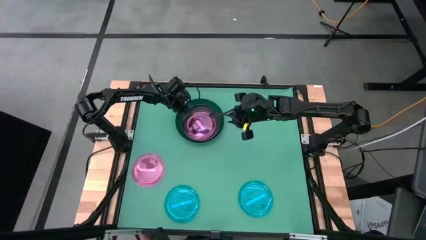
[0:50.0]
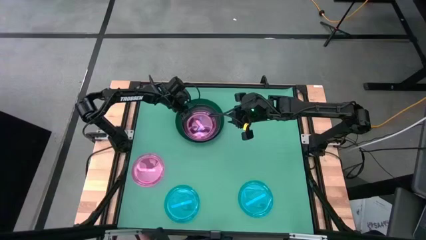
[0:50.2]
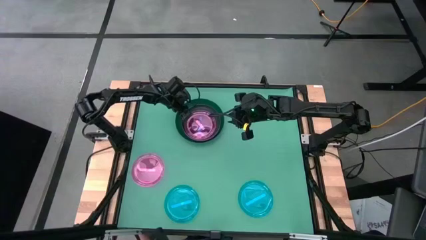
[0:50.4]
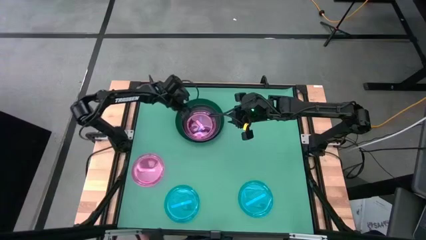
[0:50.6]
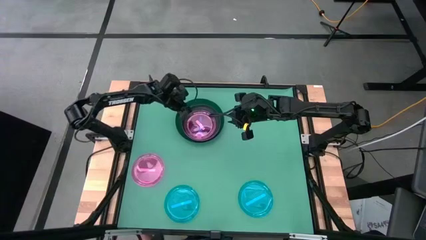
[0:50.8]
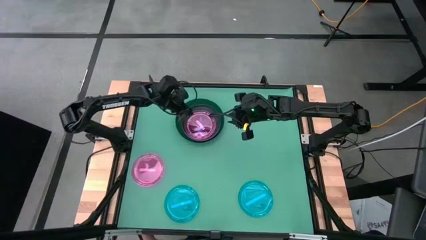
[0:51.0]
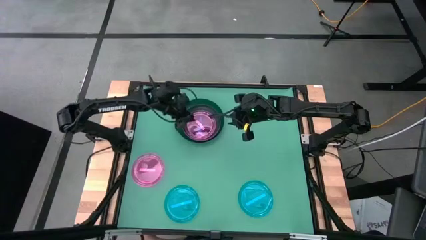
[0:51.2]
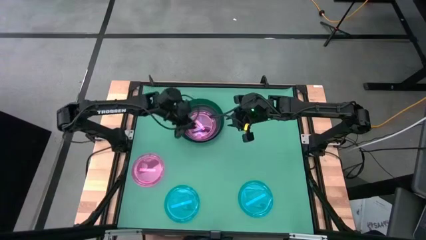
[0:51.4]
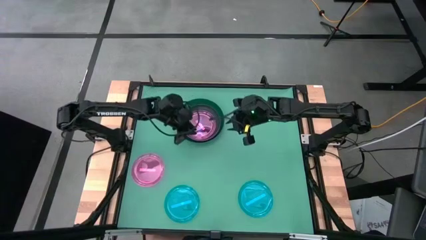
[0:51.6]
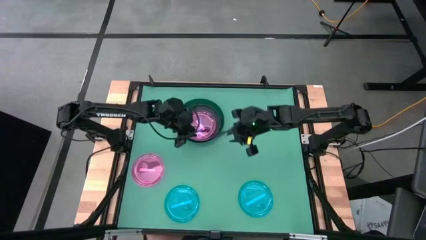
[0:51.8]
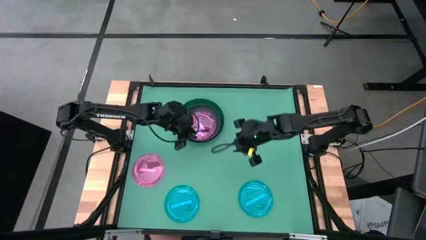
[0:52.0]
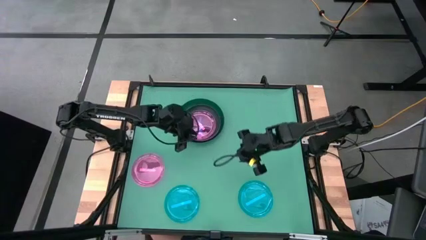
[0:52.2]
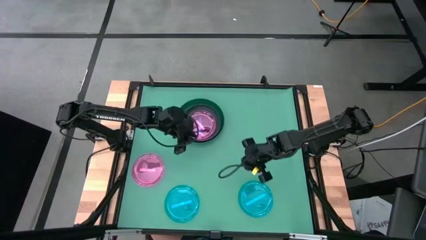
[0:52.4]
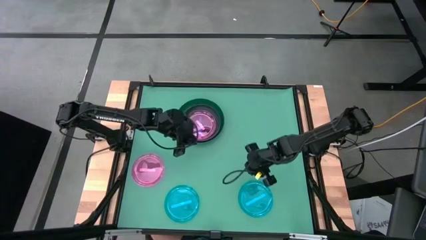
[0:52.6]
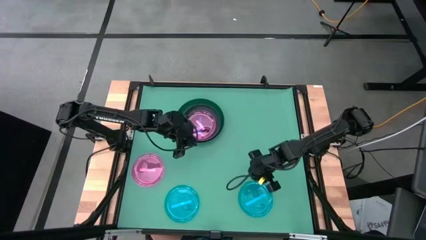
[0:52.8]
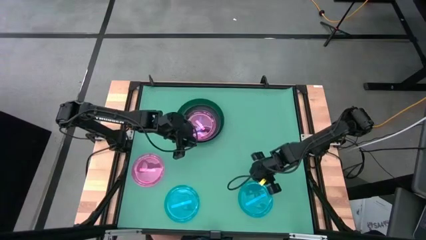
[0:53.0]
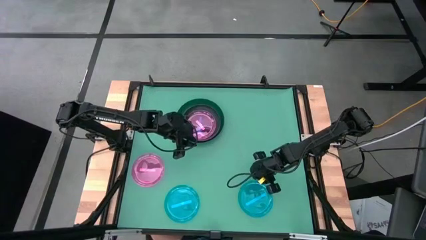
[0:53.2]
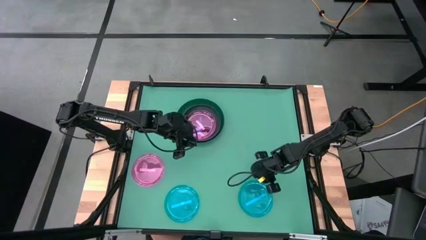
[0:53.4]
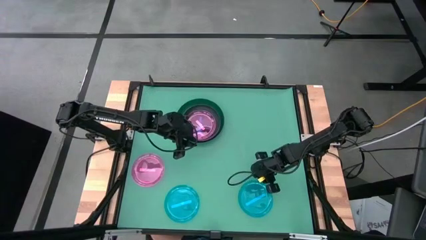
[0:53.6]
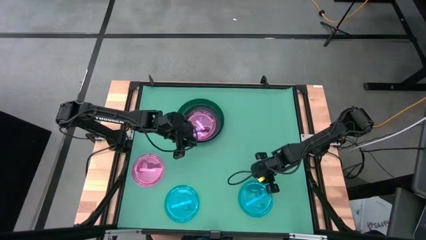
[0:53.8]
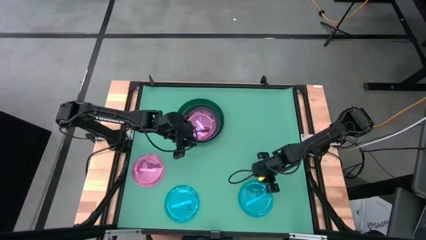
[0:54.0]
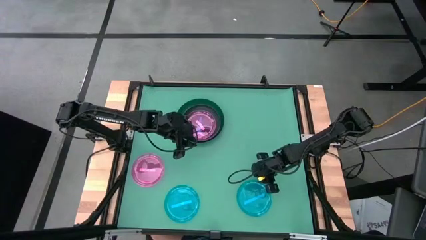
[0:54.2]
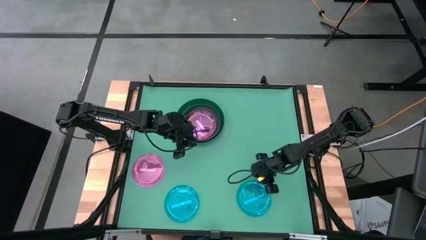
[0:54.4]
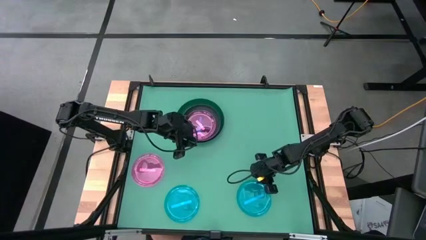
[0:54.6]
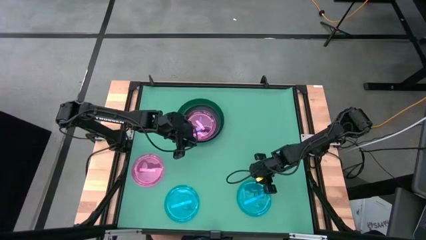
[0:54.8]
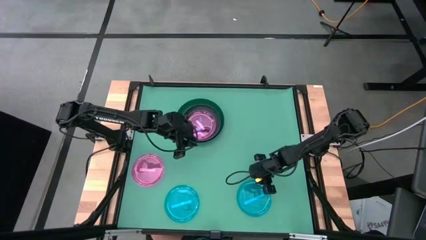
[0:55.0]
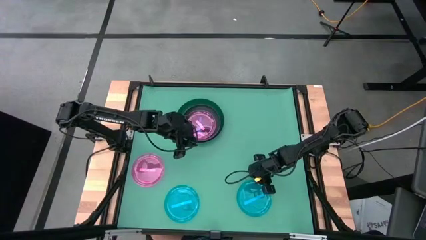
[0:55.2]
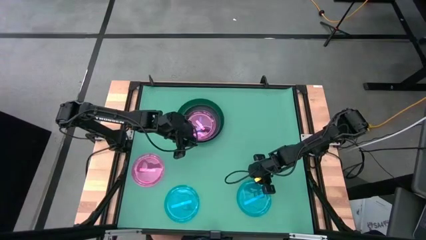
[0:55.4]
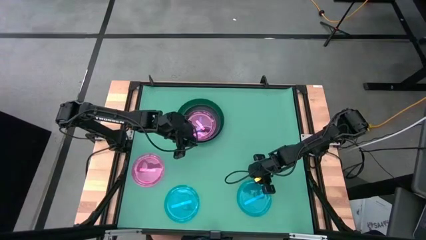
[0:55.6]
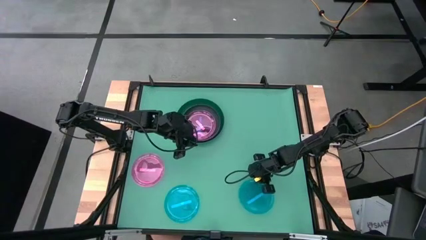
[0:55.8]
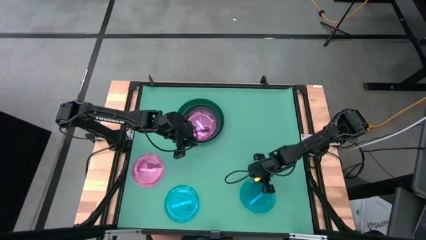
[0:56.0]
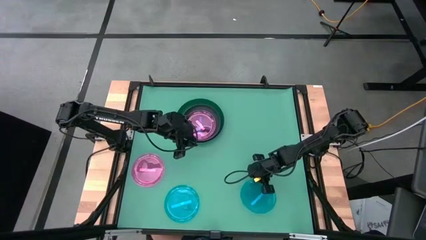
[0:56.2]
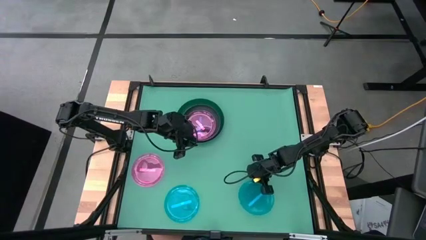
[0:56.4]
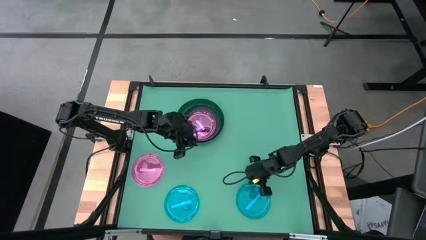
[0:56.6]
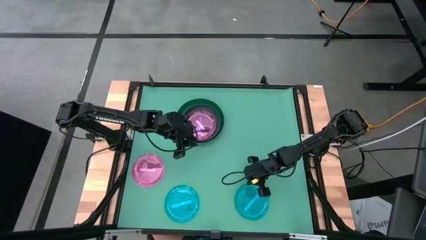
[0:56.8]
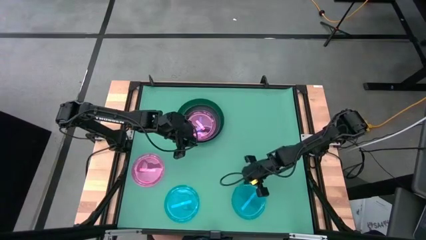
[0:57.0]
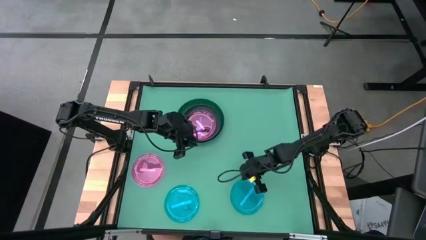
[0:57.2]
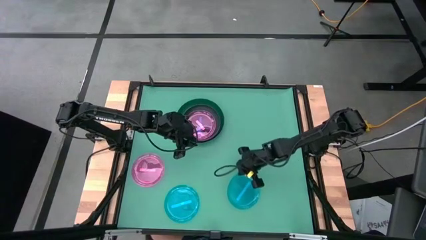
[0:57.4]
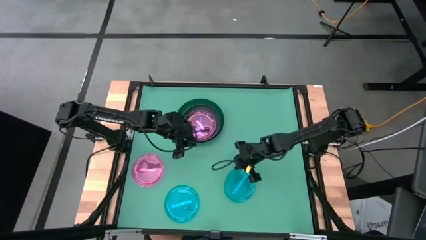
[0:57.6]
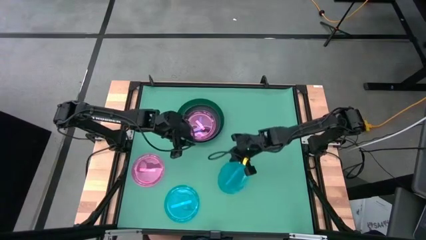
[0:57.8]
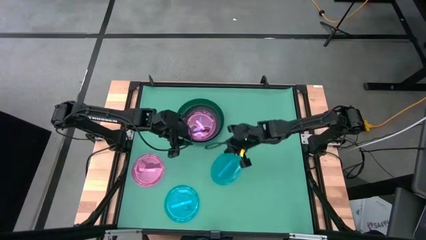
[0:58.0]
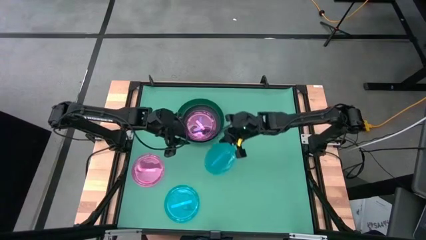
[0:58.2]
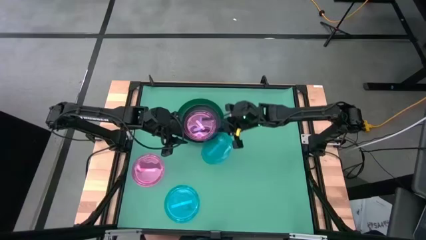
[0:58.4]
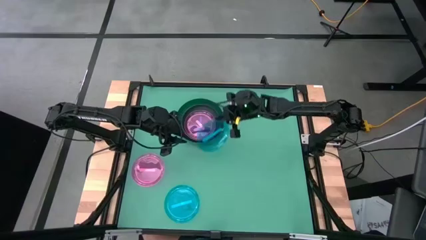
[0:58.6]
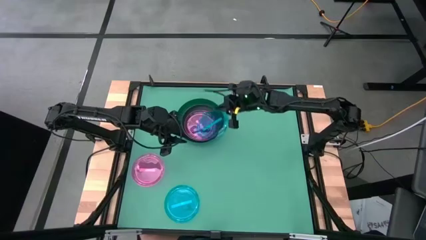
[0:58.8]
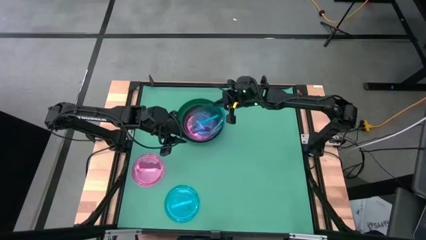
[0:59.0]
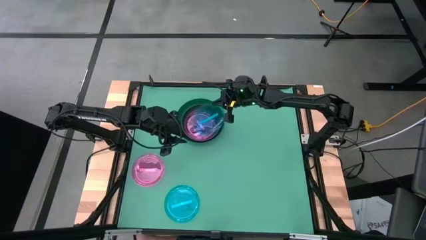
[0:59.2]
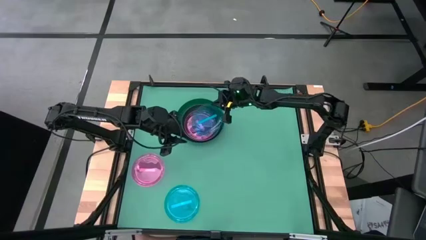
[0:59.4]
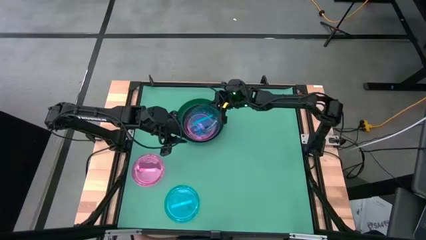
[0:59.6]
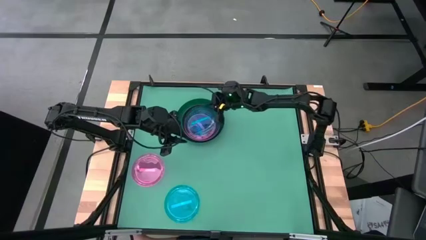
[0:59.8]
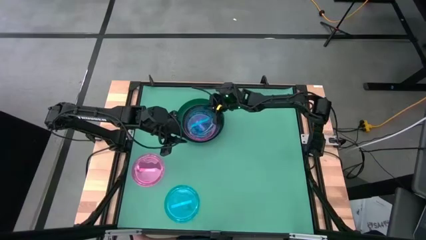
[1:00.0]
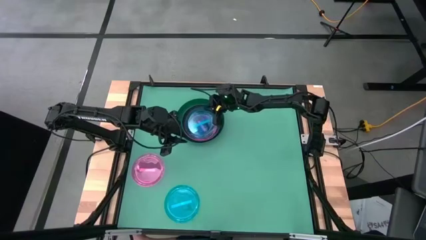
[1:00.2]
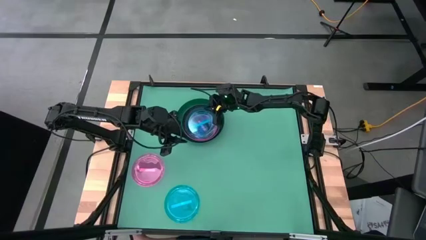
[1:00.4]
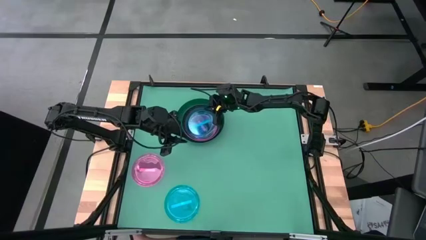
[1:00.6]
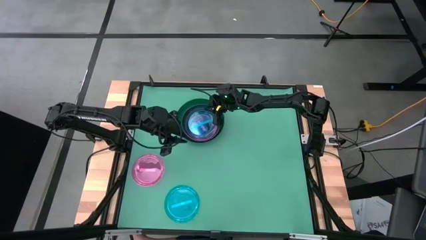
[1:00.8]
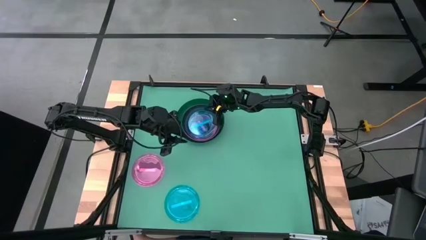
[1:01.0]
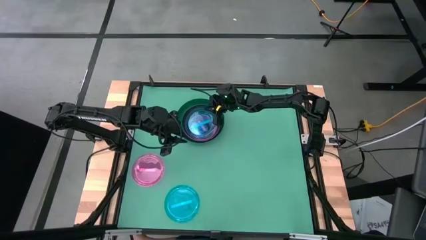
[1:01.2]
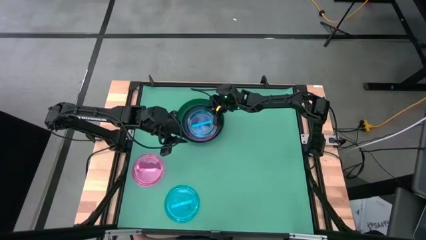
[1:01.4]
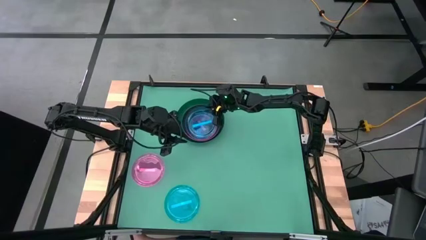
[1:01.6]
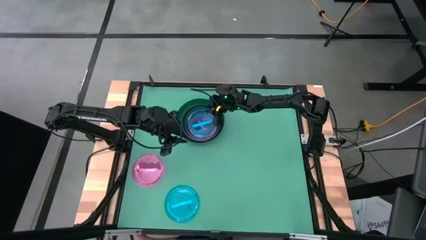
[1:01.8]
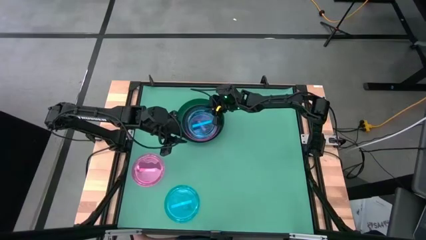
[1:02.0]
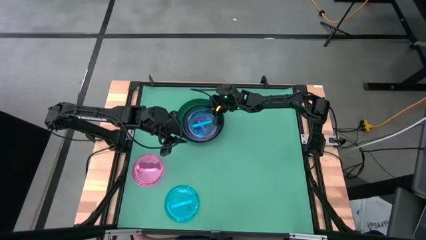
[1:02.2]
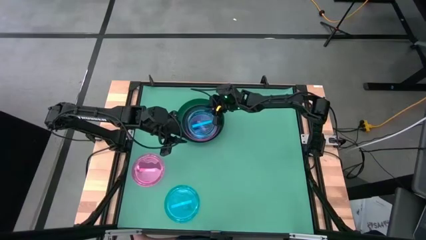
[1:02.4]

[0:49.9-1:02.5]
Task: Stack plastic plates
Stack the right blue plate on top of the light pink plate
